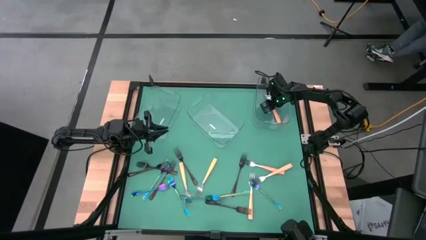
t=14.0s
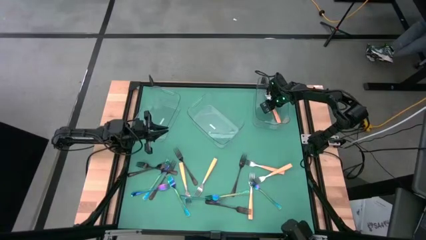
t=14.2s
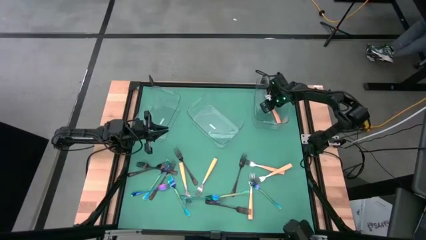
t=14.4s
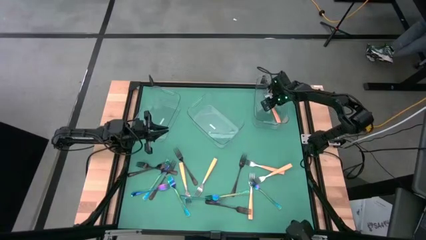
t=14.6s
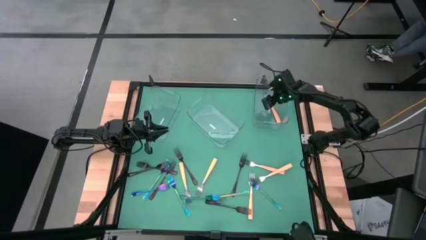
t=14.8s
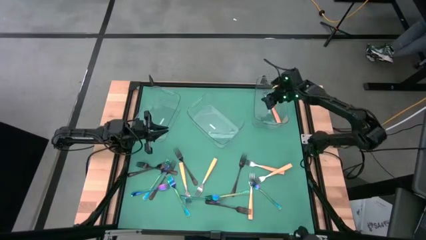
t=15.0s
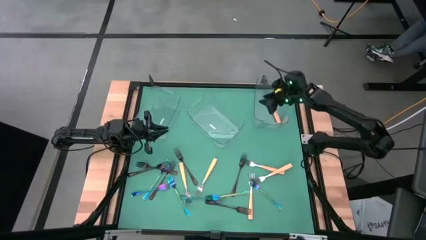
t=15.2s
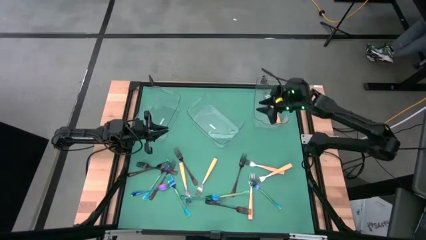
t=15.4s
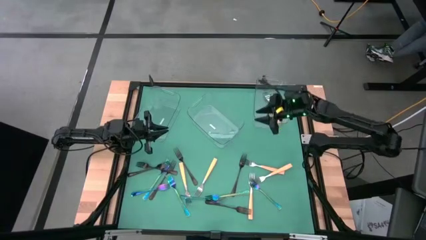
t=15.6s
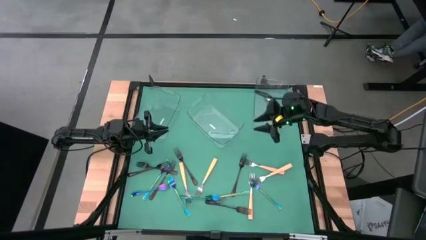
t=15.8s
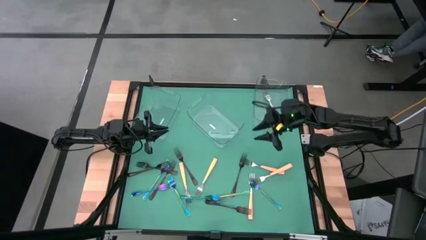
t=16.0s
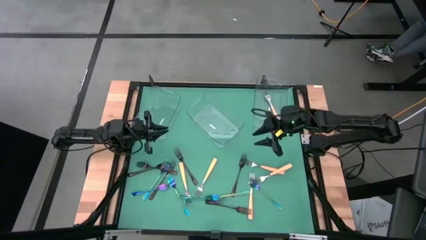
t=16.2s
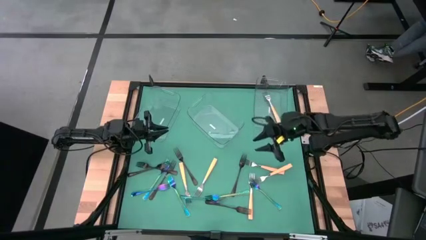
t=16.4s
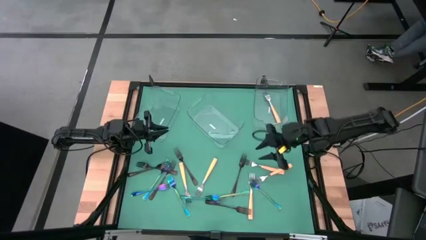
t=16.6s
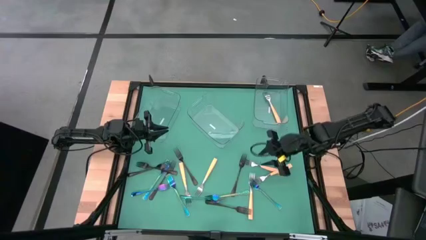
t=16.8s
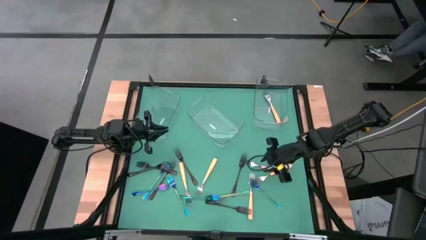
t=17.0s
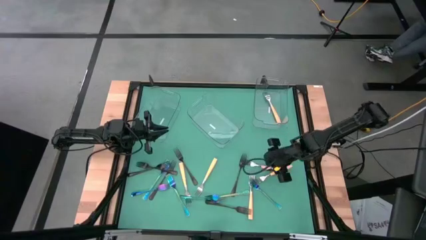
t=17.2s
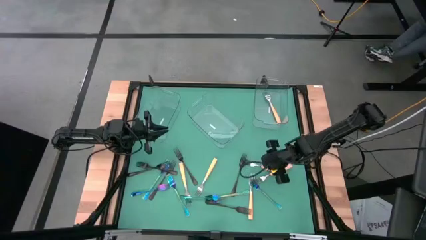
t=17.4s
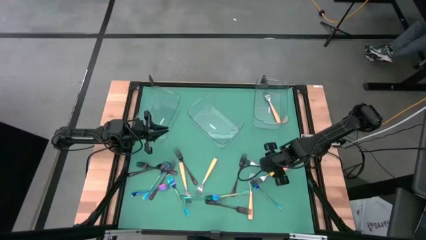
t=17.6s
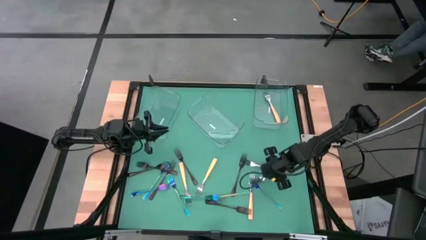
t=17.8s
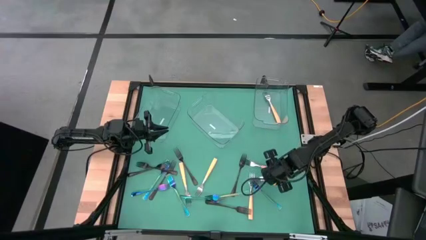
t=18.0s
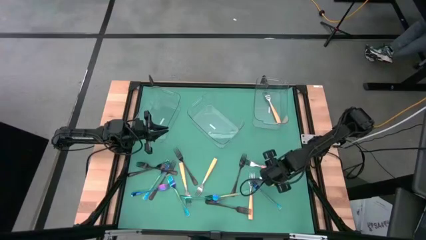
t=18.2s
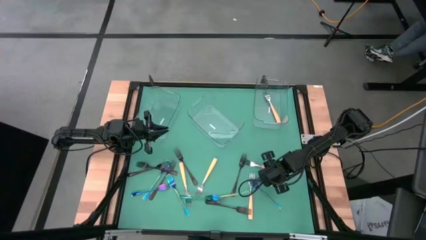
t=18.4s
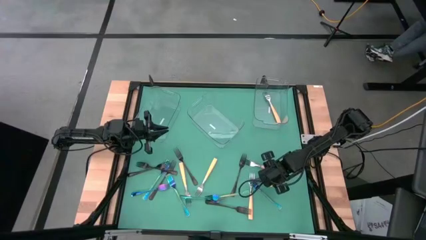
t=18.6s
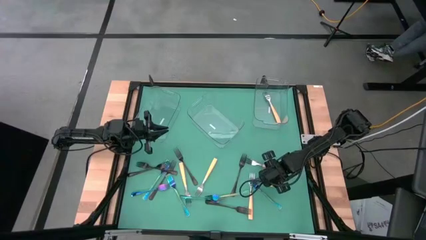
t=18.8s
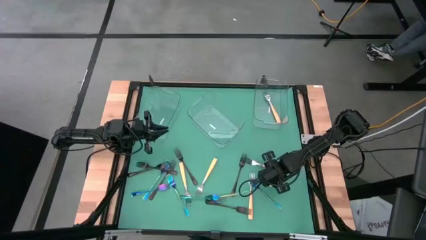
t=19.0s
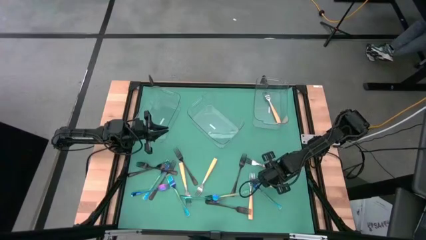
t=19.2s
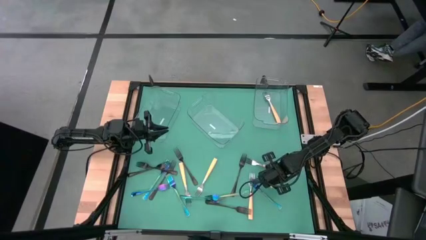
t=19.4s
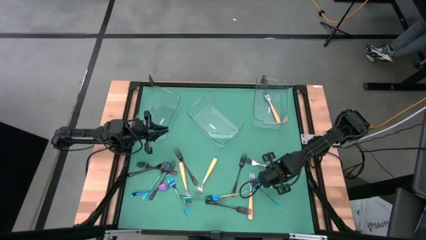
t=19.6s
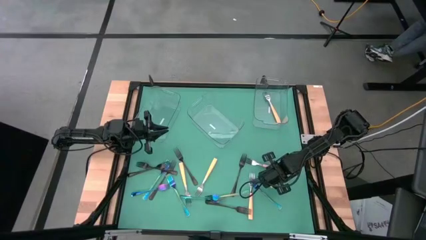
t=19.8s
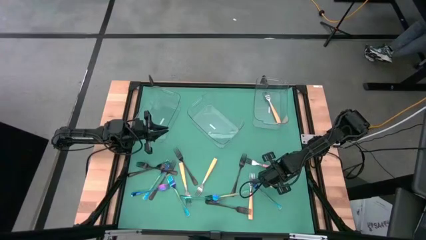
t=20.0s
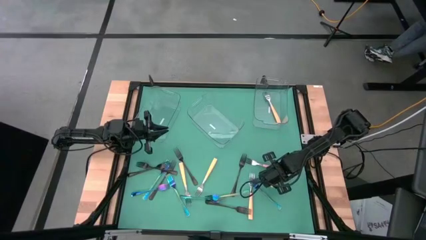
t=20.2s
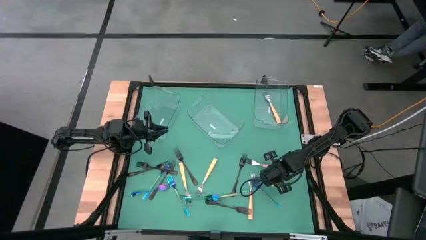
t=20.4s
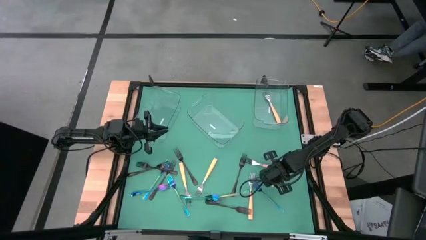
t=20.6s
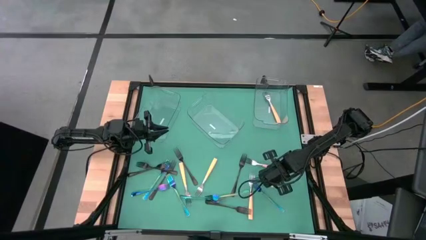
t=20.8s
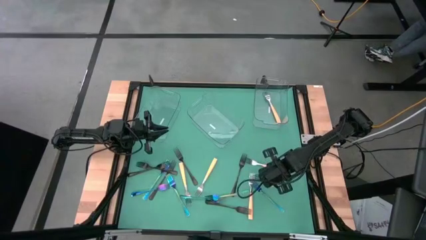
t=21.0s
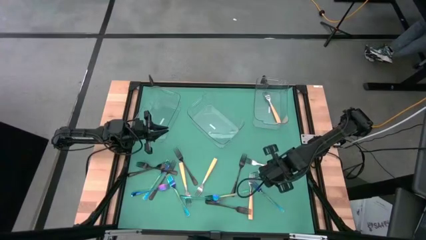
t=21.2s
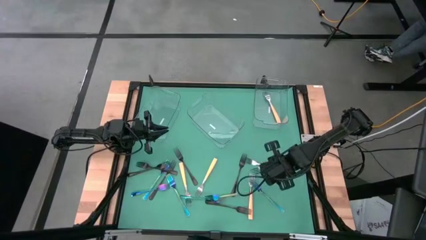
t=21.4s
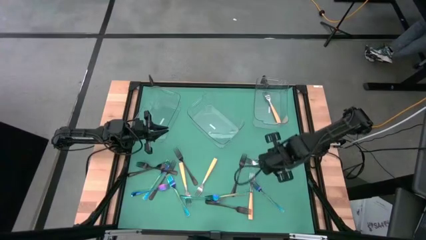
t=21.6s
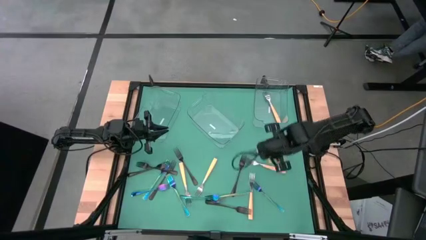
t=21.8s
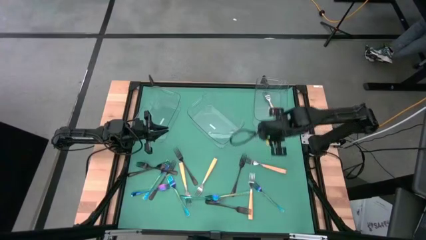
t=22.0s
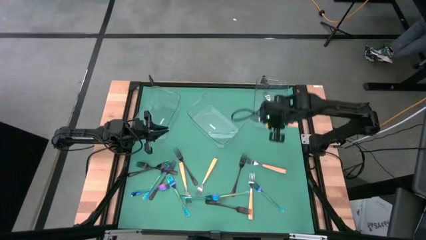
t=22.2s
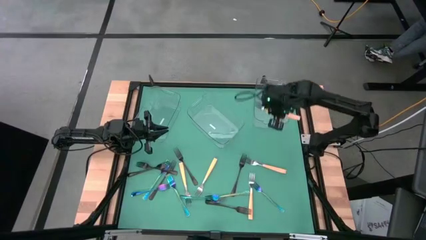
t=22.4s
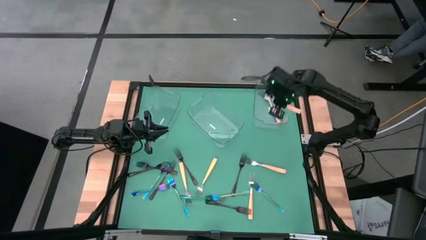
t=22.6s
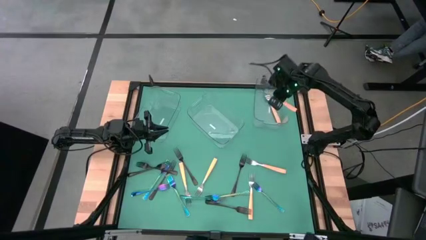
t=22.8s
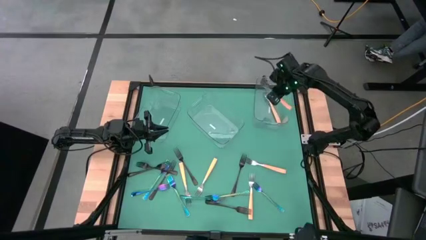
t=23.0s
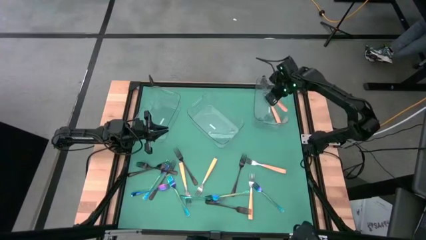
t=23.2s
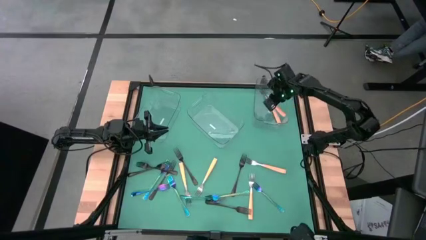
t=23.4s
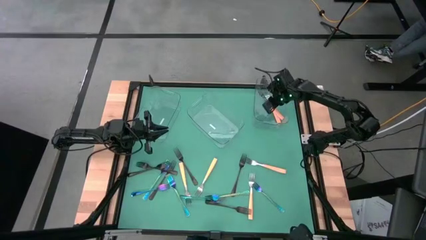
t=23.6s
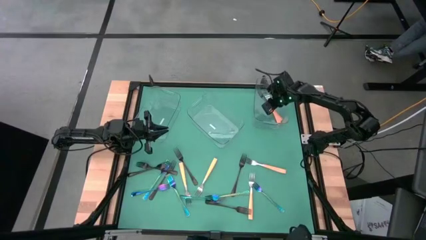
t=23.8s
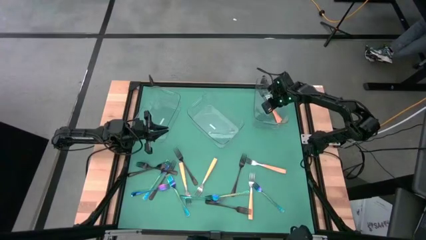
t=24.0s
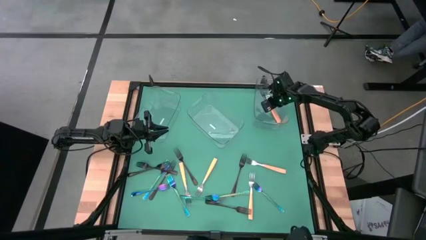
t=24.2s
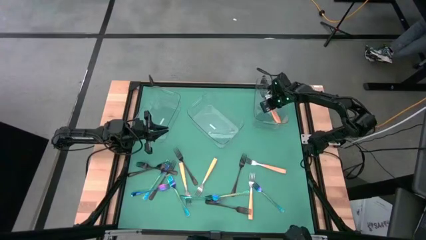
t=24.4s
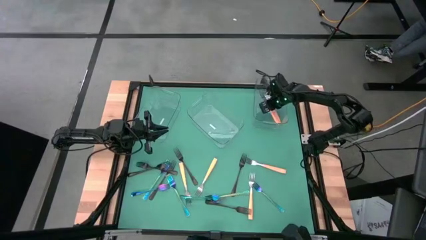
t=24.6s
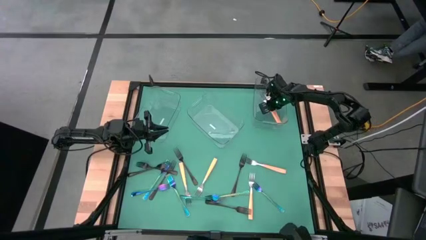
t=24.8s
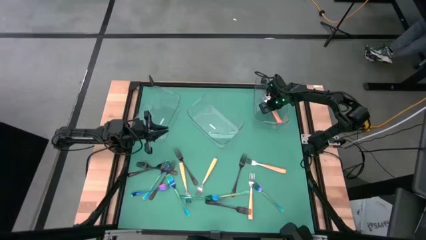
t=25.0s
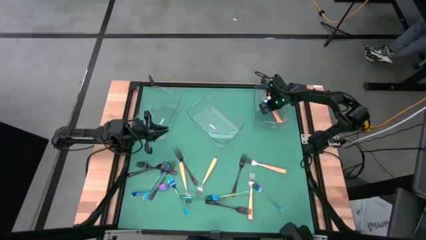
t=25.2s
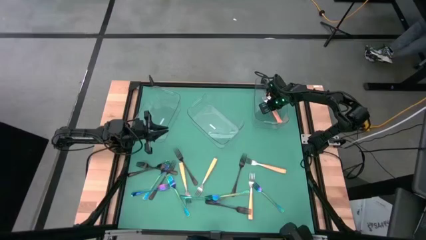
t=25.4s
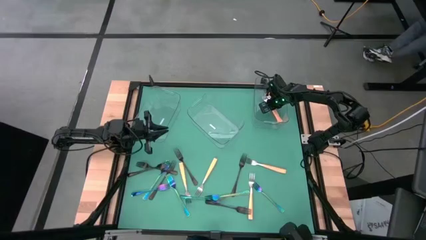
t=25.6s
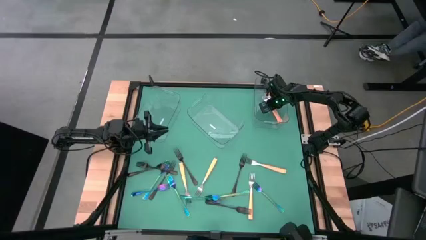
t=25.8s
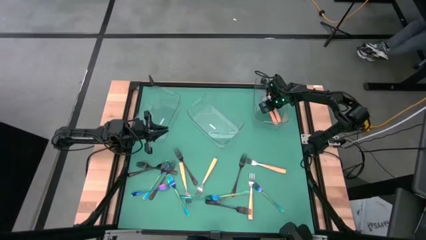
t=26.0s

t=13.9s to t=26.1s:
Task: Sort silverware by color (type)
Put the orange fork into the right transparent bin

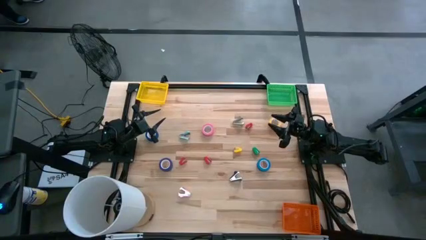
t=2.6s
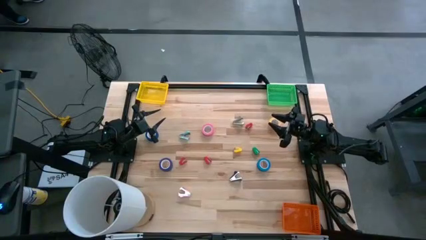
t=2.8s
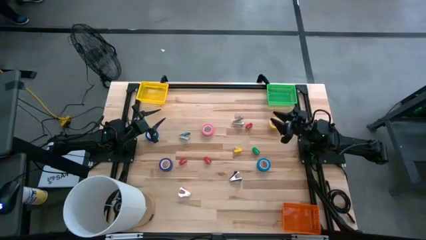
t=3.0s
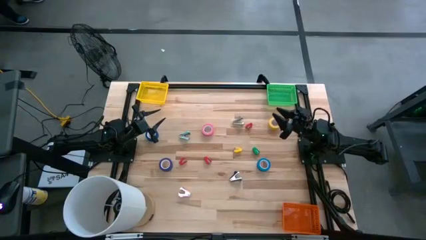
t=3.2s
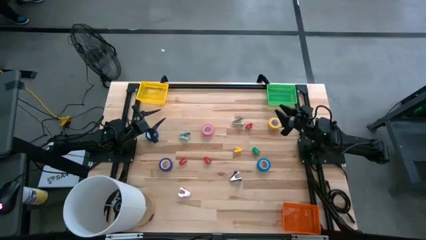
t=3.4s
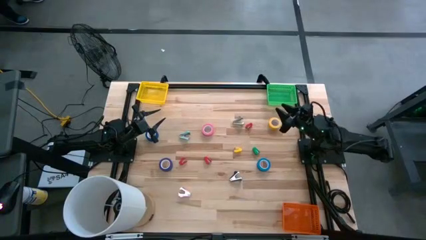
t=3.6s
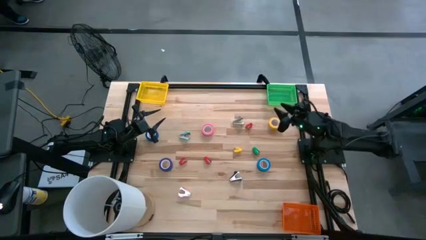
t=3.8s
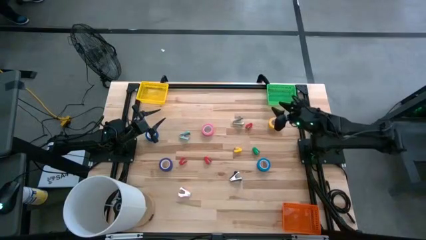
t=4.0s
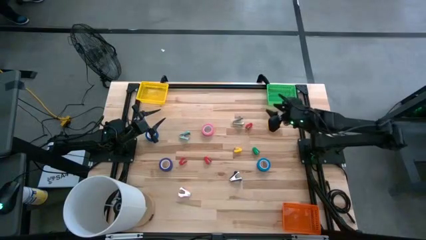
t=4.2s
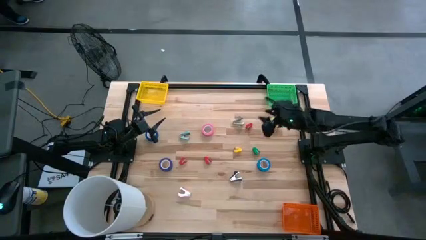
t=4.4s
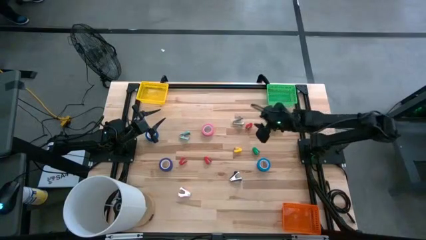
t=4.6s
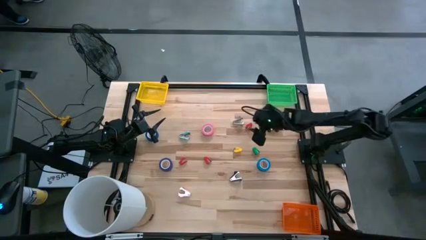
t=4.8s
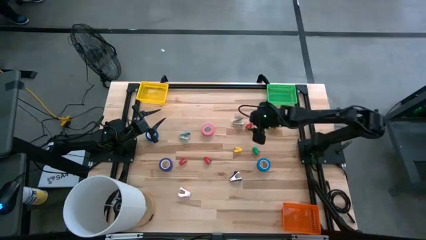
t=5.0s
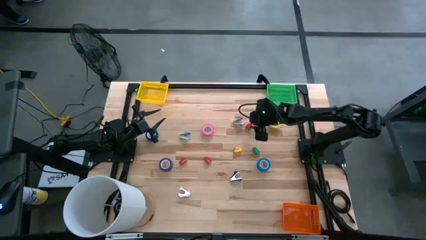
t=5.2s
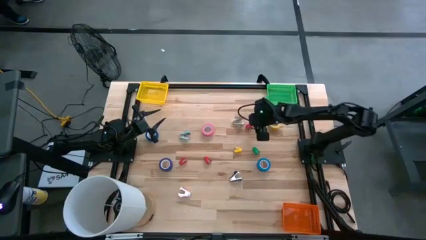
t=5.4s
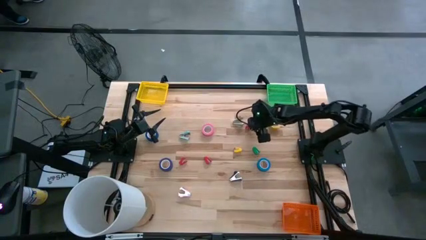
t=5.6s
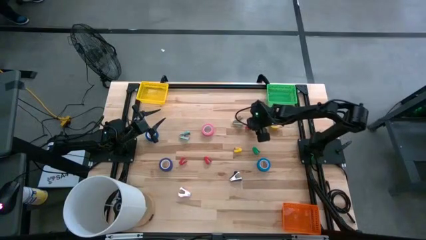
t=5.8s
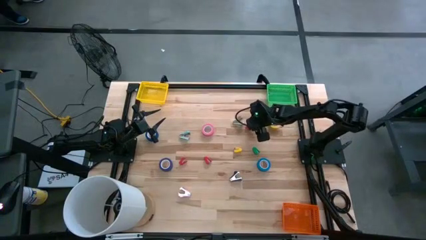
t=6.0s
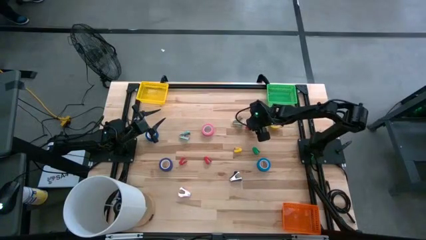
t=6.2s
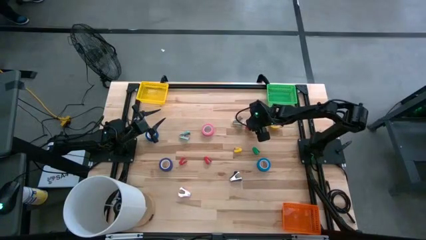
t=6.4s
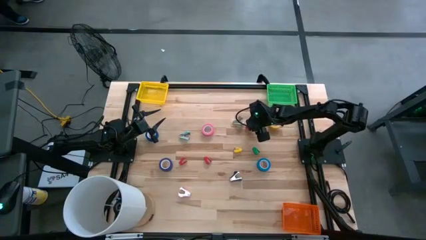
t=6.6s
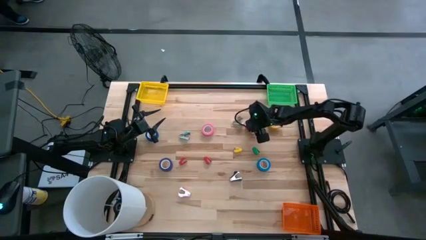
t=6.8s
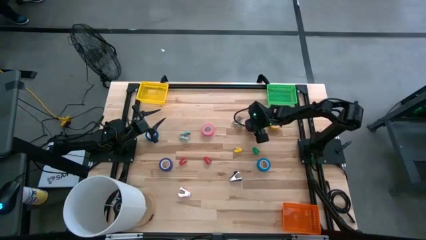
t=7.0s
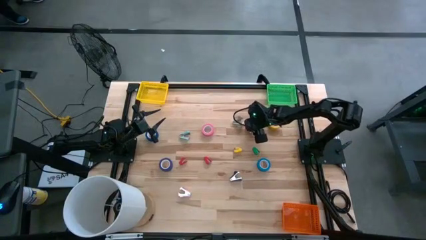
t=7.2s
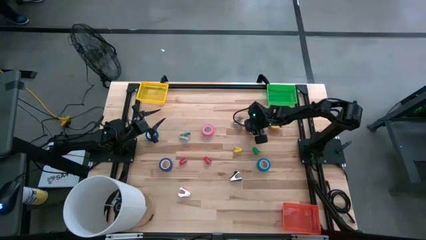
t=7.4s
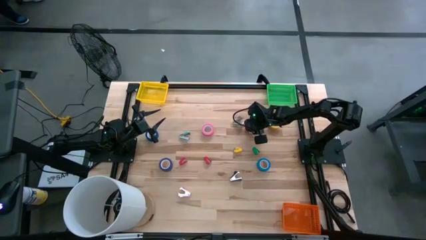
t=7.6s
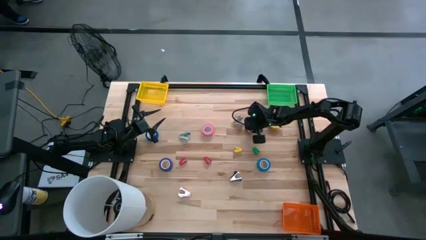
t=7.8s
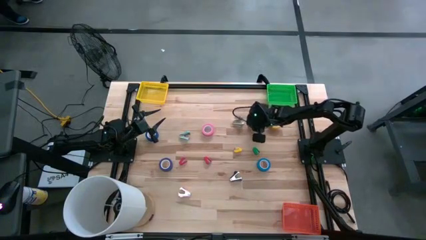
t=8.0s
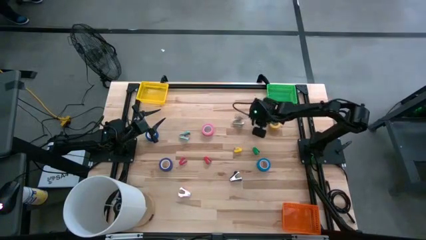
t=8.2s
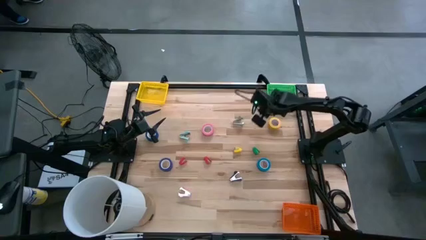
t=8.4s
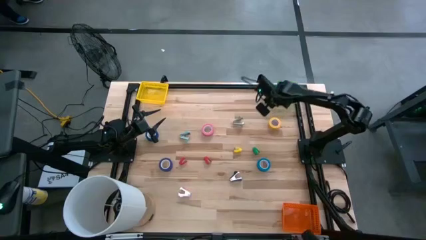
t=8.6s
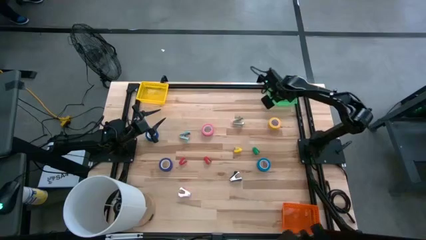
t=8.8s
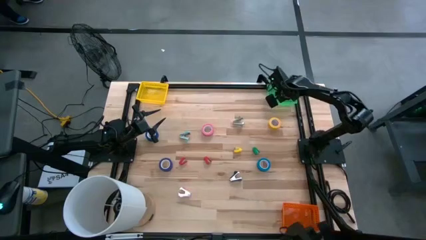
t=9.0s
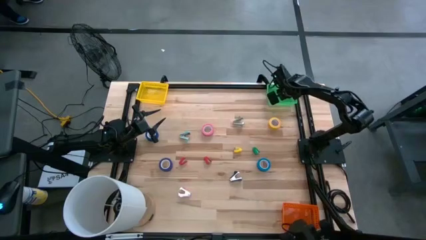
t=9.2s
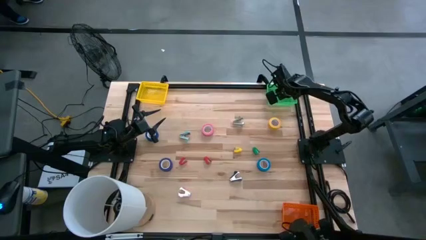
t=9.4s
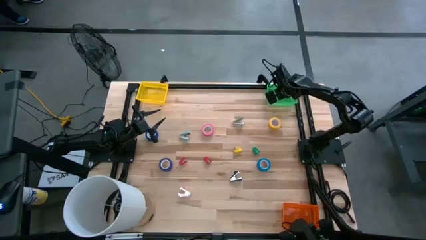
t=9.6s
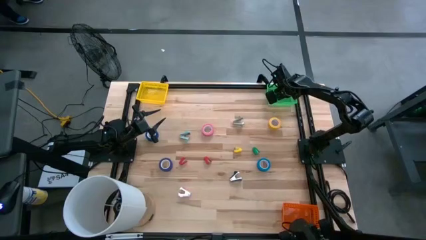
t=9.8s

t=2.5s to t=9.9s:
Task: Pick and place Stapler, Stapler remover, tape
Put the top right red stapler into the green bin
